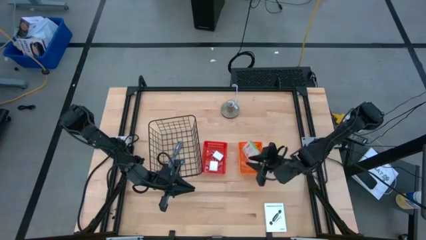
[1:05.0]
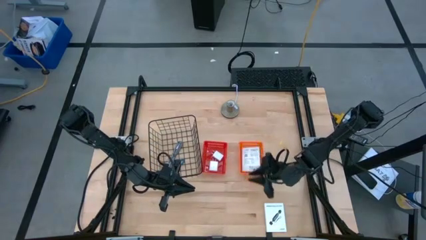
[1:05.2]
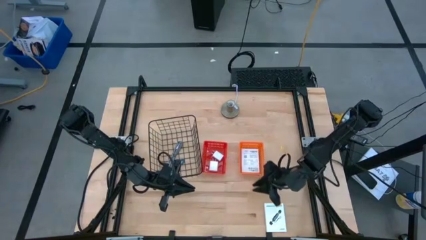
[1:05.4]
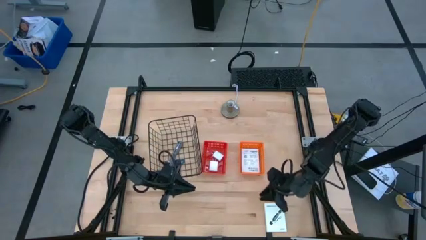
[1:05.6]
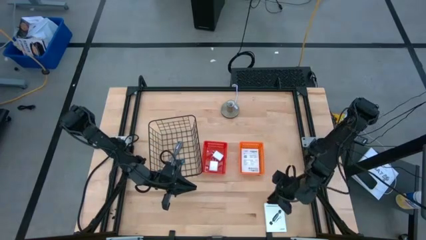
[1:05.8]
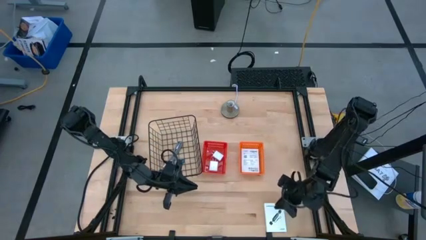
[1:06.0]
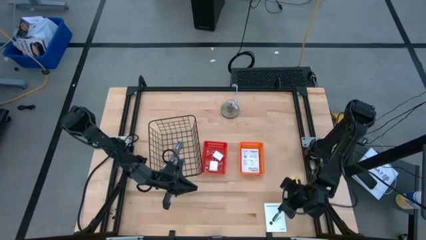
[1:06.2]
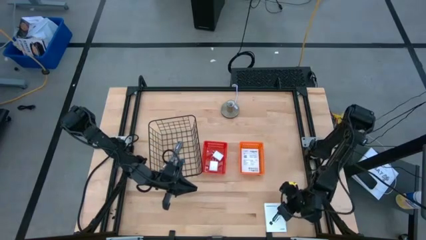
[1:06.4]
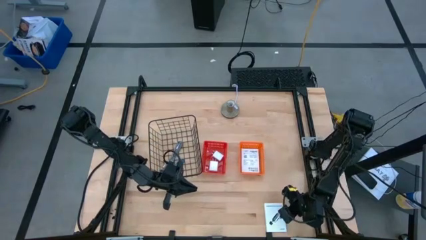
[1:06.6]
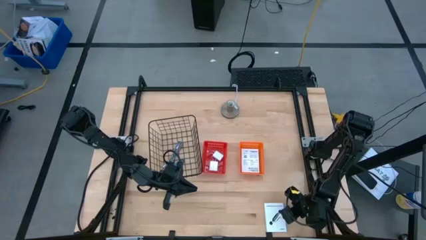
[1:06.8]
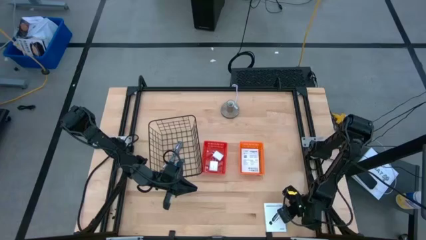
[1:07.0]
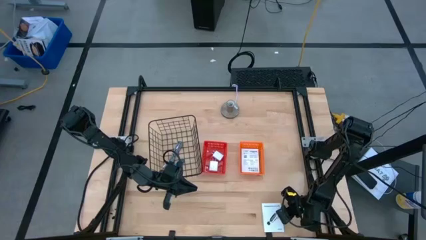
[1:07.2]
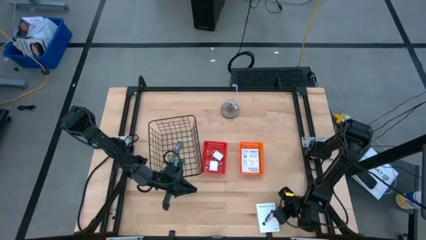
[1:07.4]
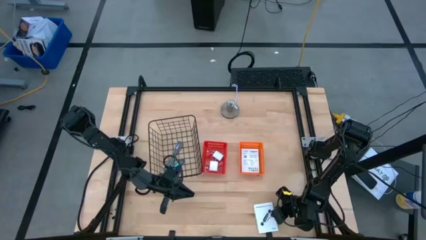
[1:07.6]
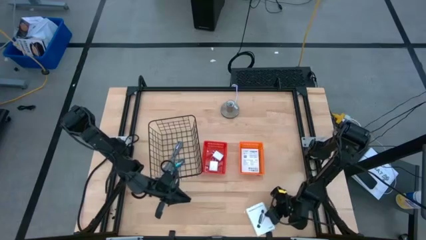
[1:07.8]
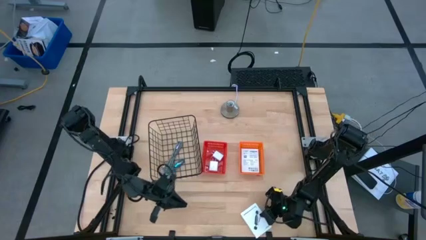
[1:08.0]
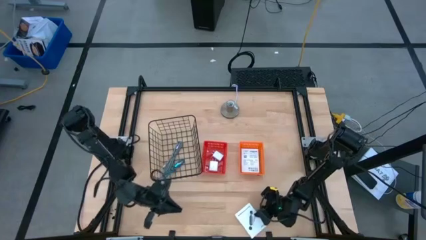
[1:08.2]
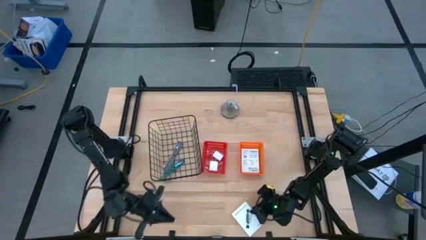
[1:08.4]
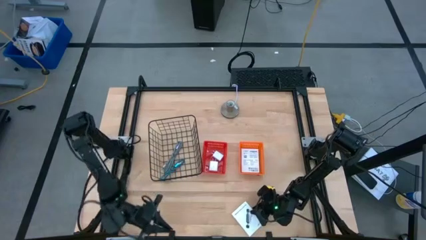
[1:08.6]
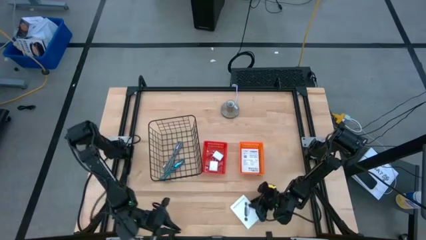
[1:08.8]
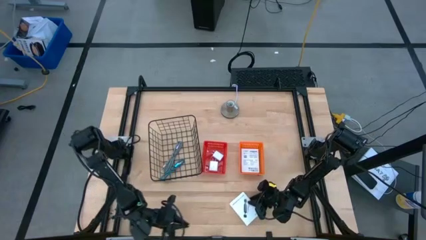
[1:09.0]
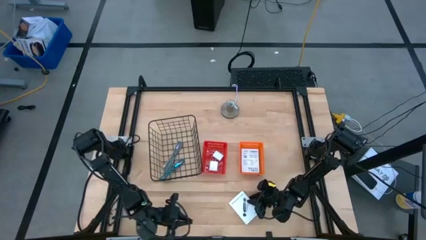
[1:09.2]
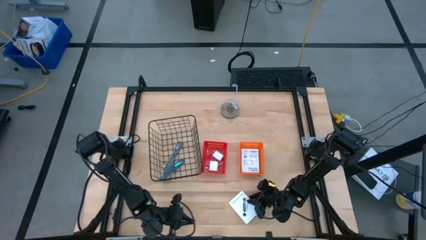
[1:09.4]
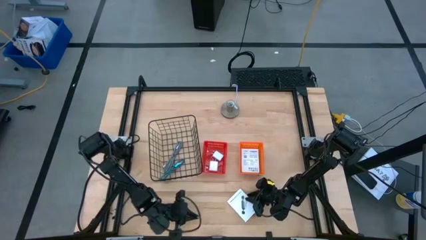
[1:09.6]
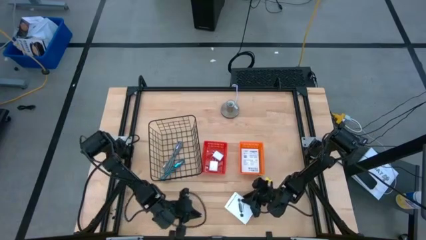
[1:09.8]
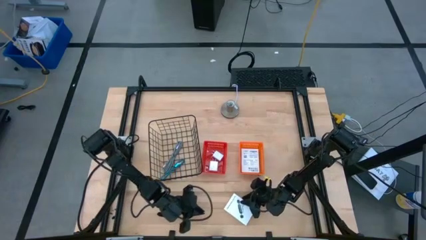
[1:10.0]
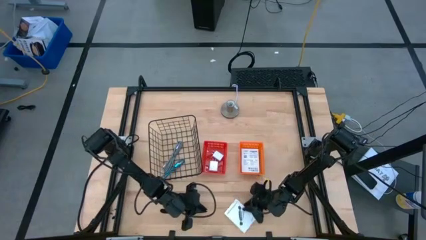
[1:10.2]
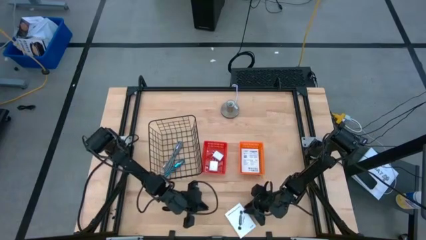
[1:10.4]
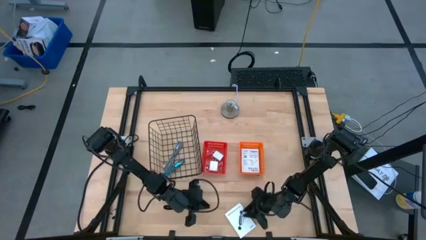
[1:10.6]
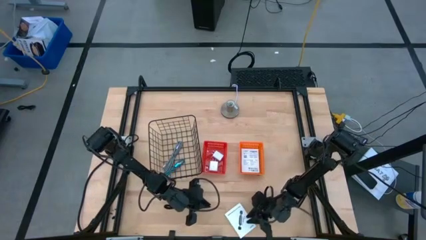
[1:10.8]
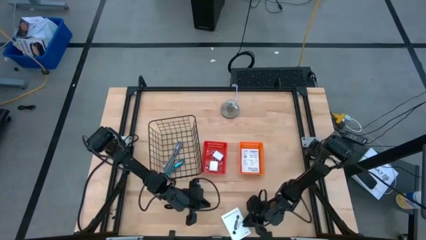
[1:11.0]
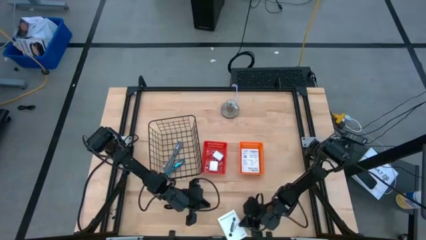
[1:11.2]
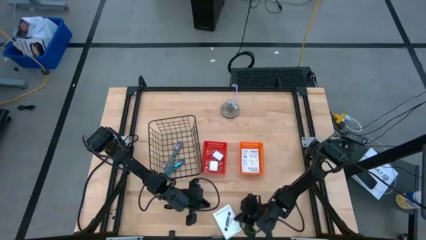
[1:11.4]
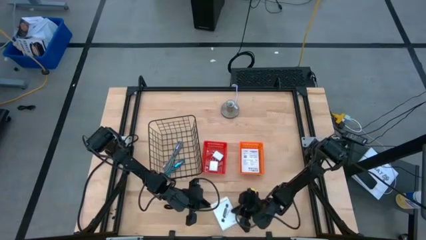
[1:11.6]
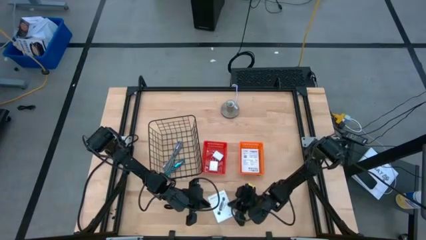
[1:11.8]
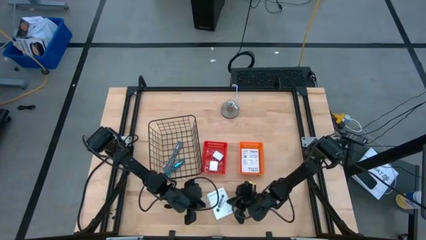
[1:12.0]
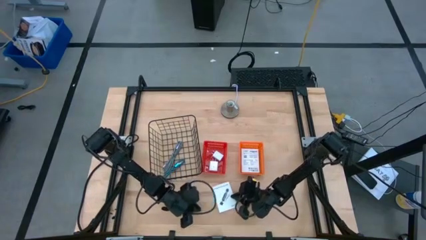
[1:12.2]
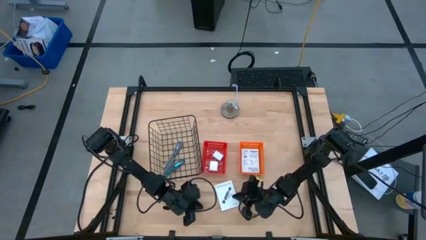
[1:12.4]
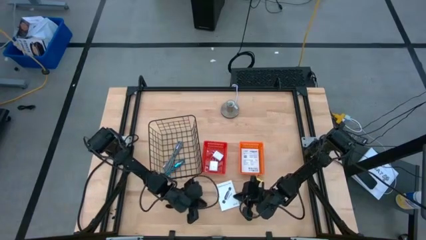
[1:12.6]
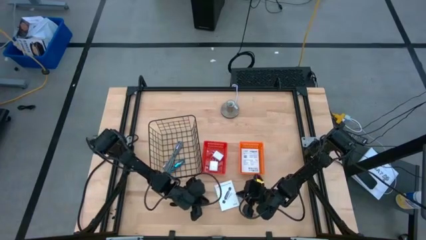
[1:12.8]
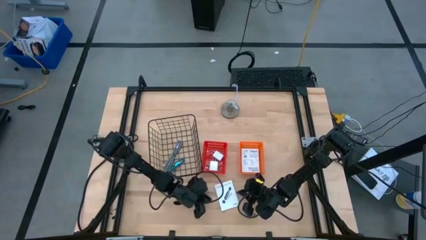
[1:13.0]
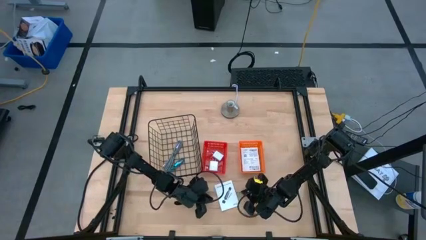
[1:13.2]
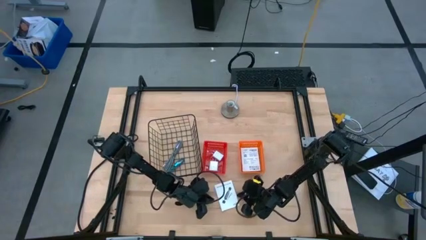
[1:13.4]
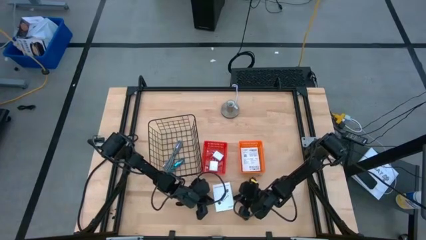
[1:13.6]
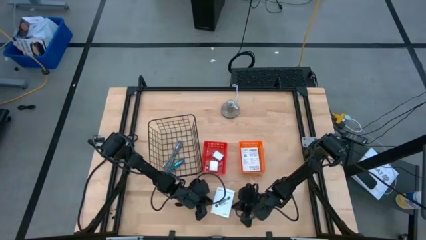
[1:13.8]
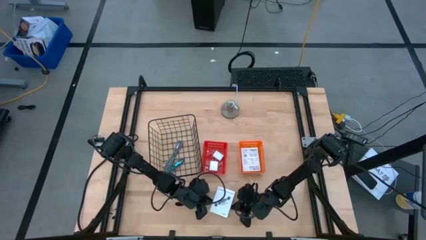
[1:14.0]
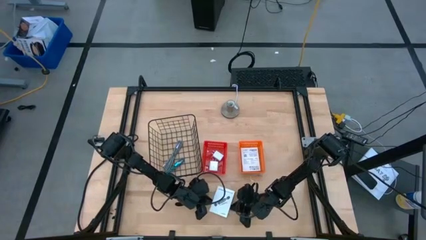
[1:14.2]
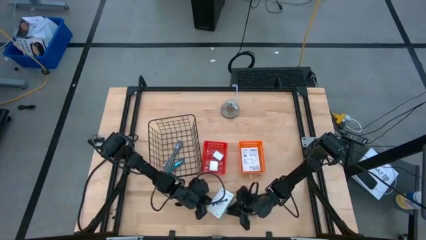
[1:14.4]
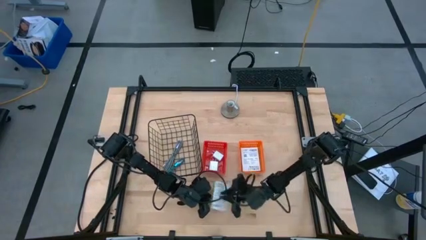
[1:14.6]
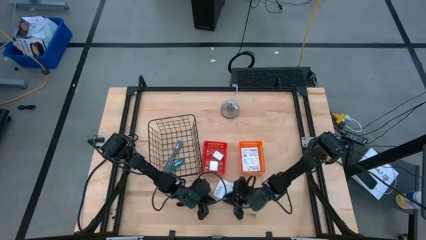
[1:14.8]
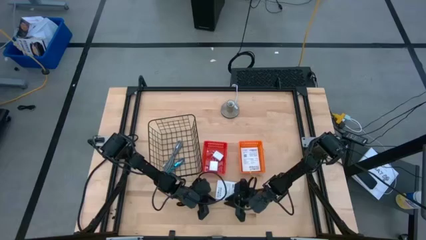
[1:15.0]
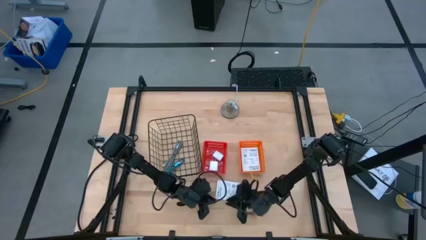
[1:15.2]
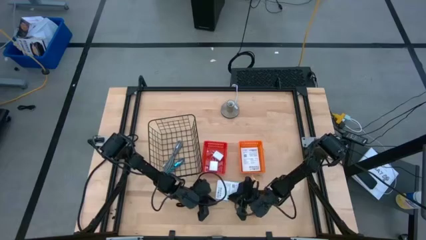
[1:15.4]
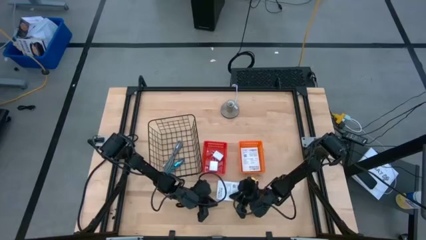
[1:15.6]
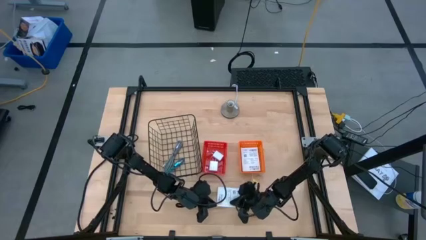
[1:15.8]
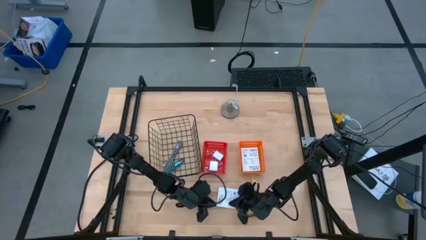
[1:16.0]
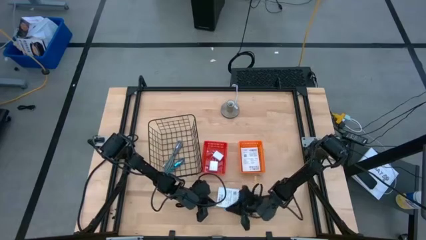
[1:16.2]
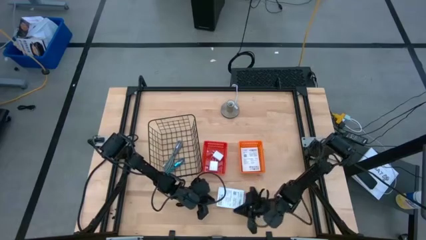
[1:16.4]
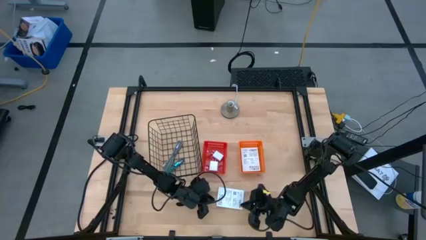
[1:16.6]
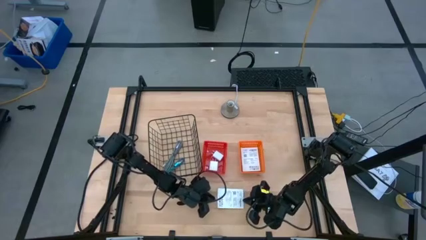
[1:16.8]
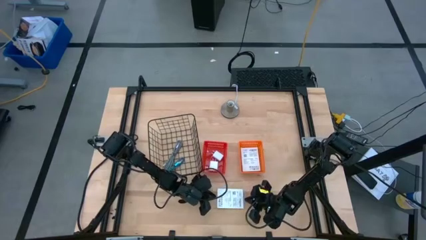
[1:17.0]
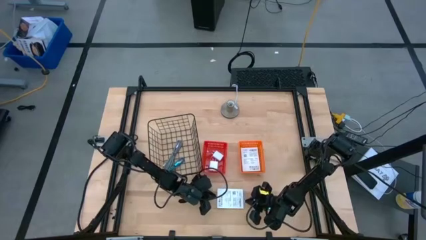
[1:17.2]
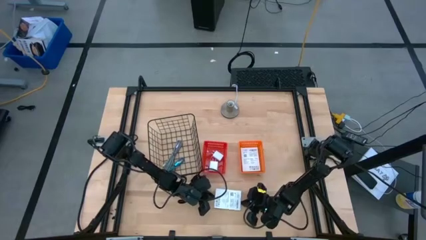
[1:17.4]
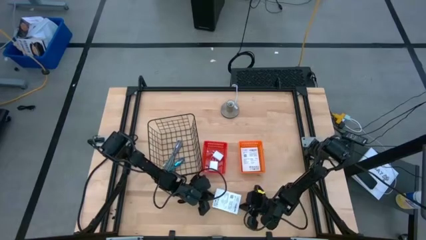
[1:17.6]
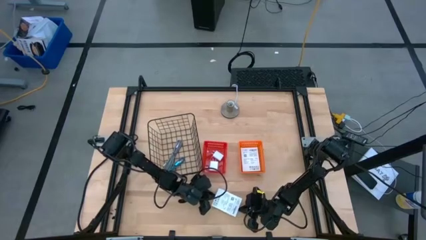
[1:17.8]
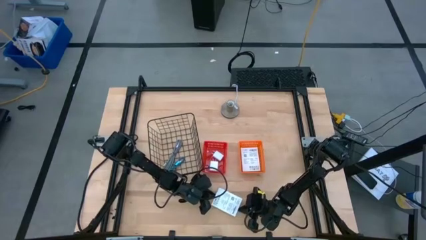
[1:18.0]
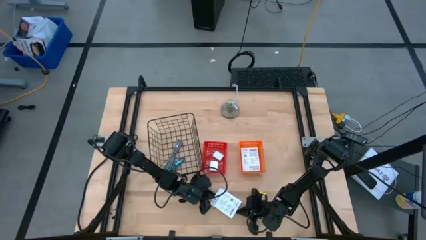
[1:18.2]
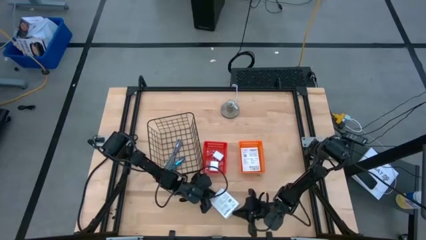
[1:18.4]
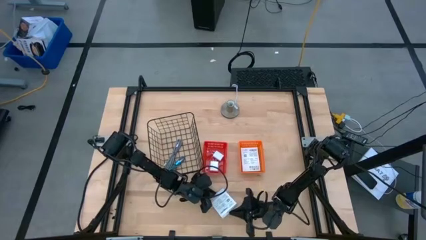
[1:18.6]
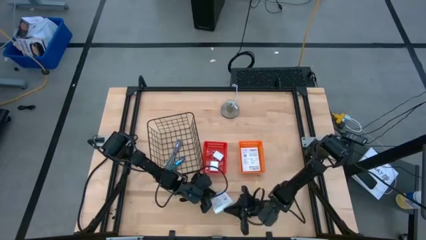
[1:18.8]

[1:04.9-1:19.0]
Task: Pick and place items into bin
Put the card reader box into the orange basket
